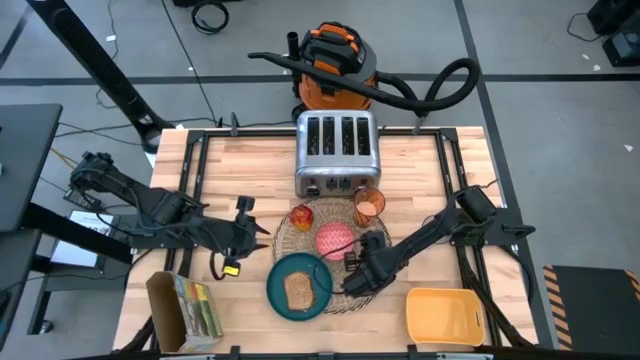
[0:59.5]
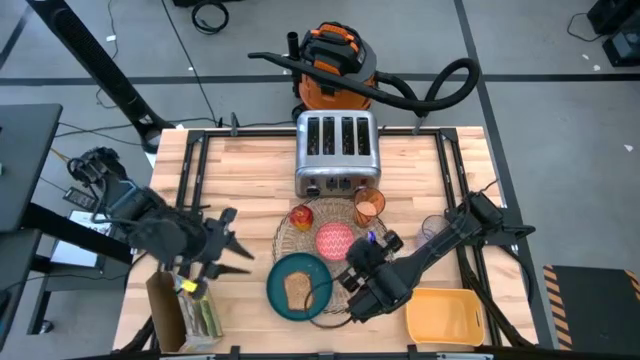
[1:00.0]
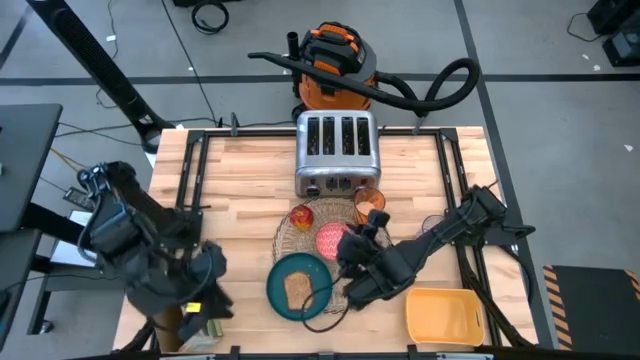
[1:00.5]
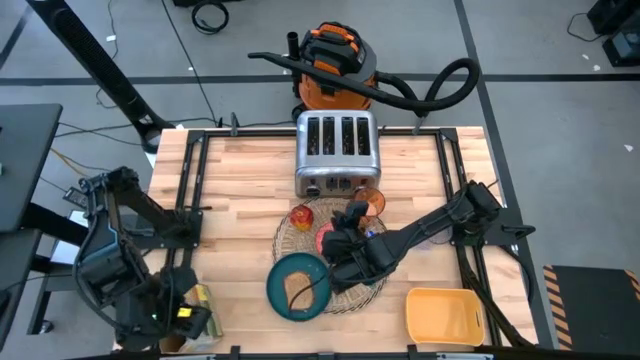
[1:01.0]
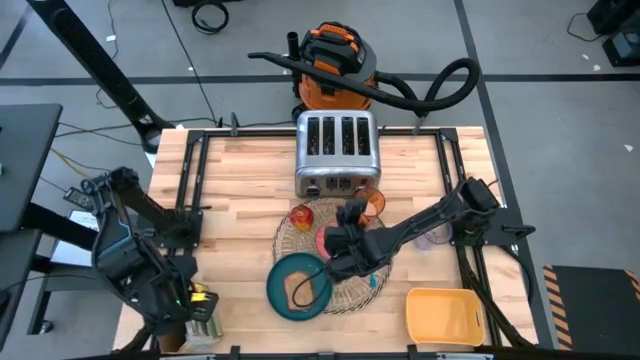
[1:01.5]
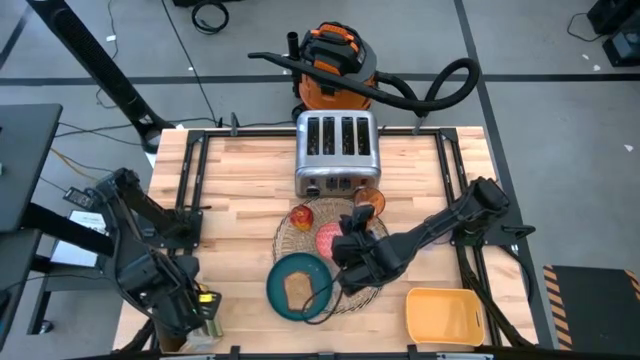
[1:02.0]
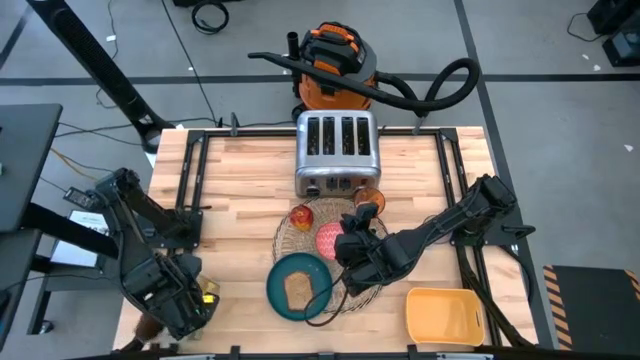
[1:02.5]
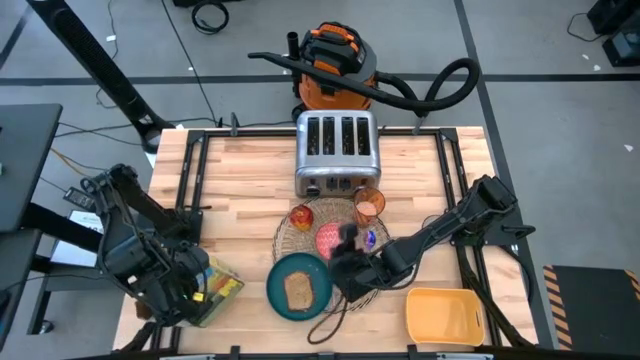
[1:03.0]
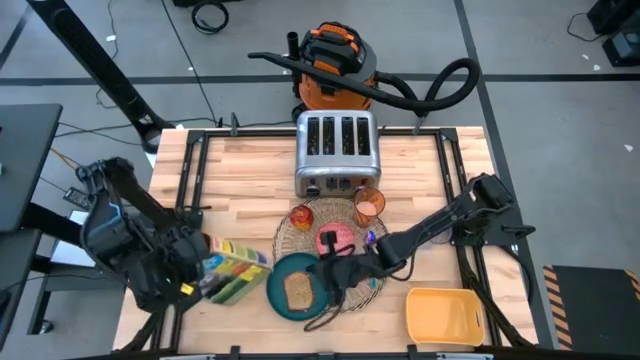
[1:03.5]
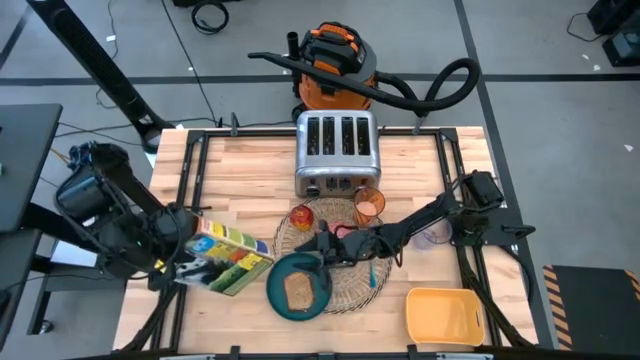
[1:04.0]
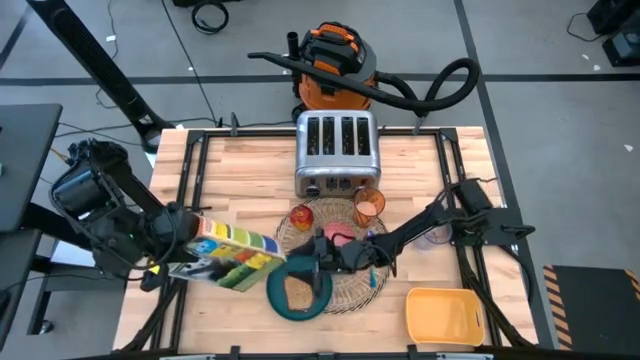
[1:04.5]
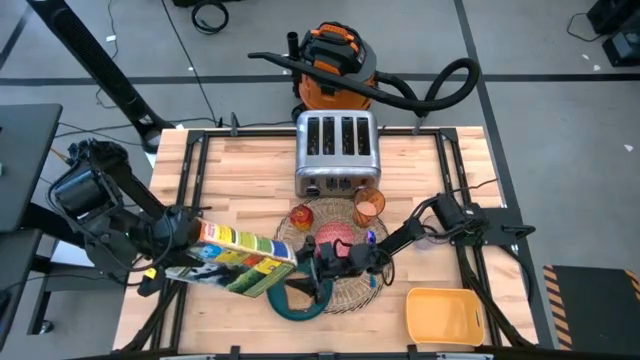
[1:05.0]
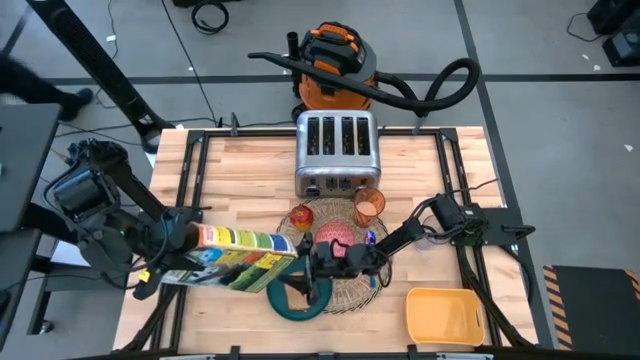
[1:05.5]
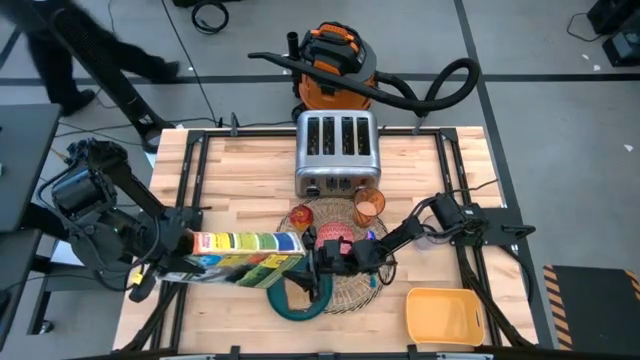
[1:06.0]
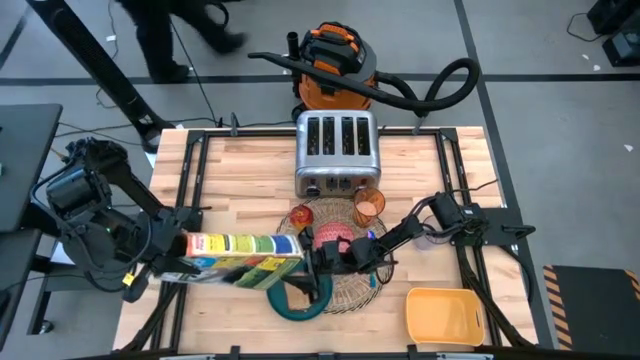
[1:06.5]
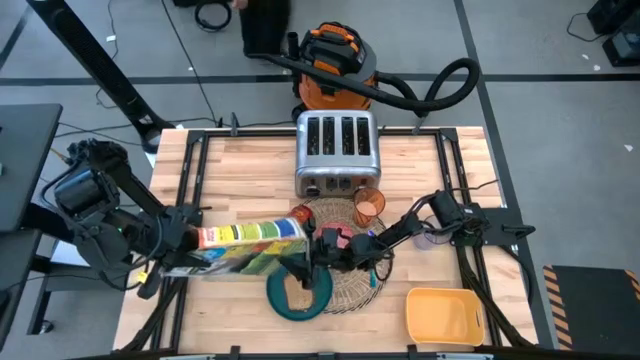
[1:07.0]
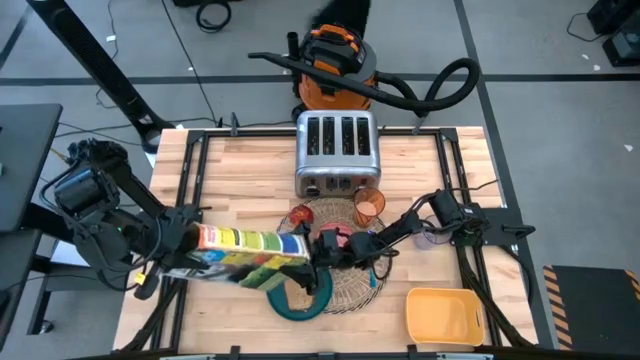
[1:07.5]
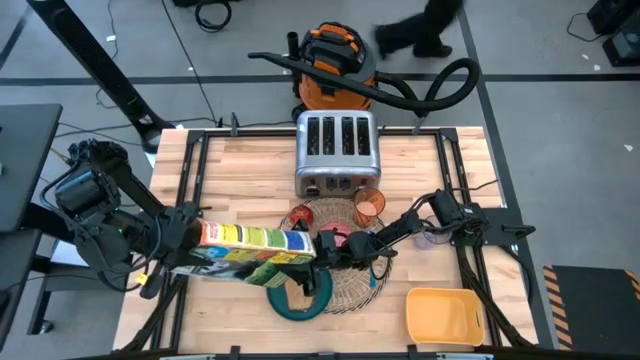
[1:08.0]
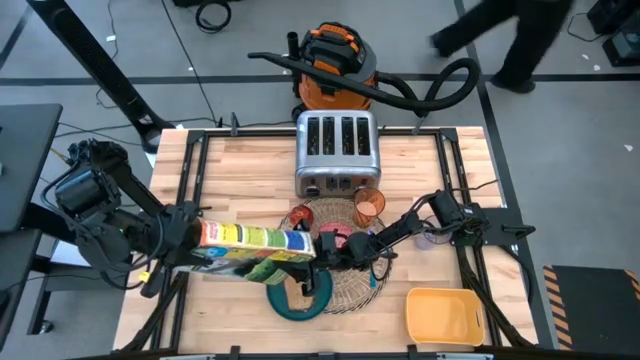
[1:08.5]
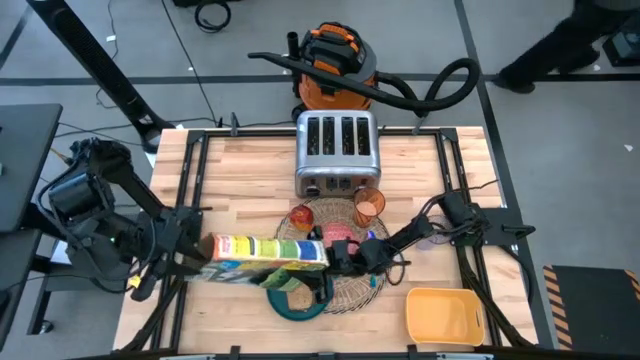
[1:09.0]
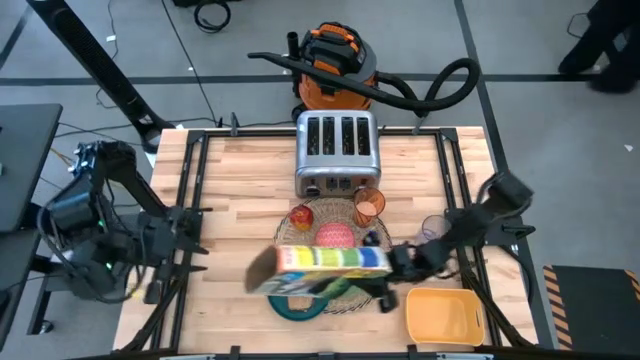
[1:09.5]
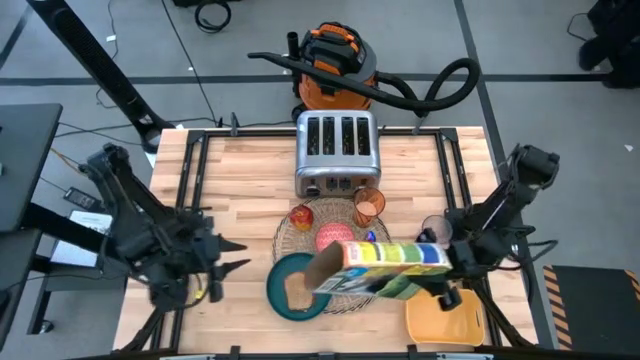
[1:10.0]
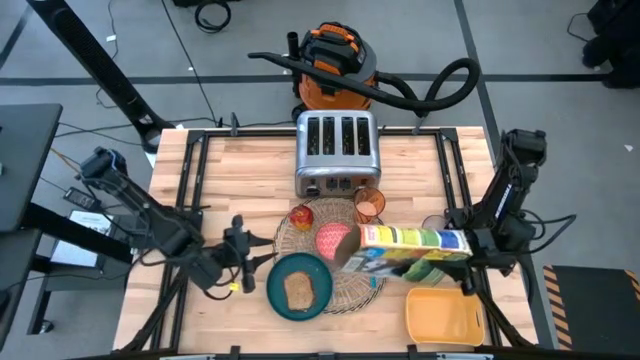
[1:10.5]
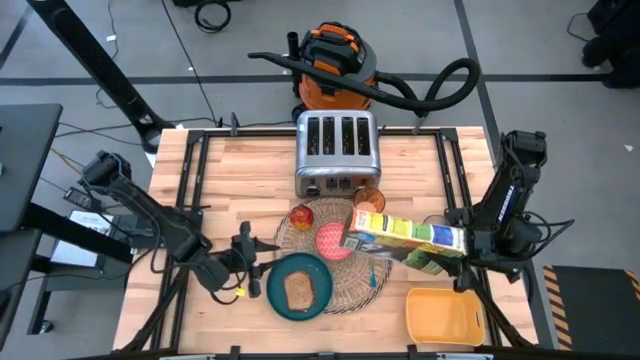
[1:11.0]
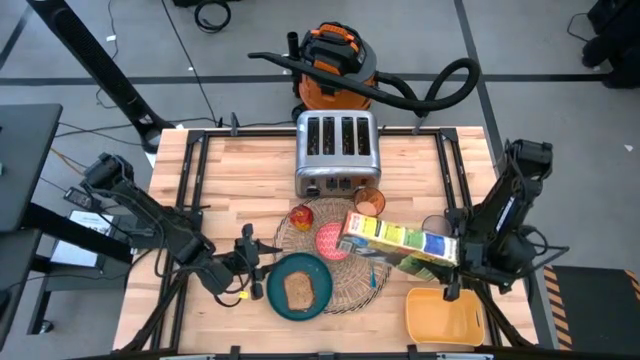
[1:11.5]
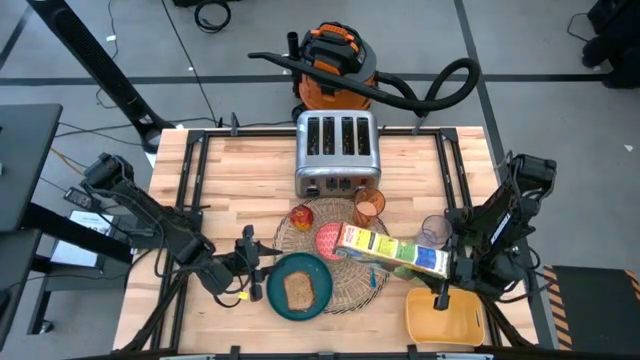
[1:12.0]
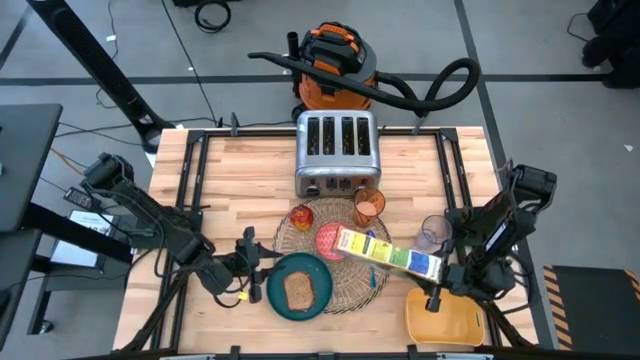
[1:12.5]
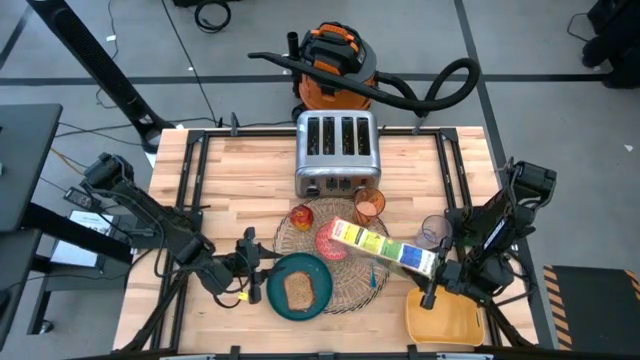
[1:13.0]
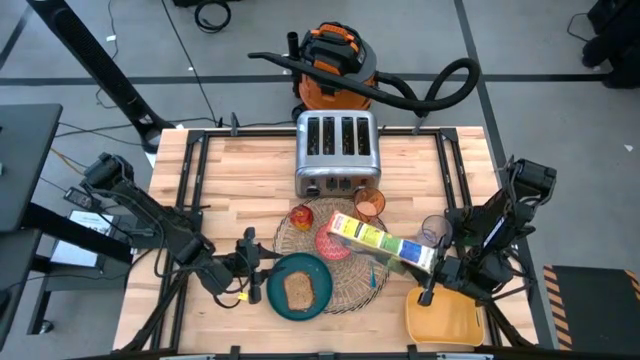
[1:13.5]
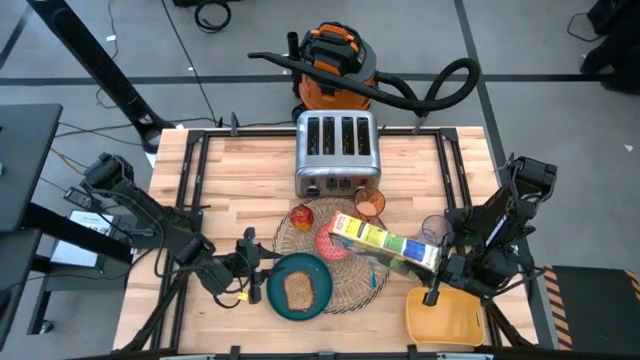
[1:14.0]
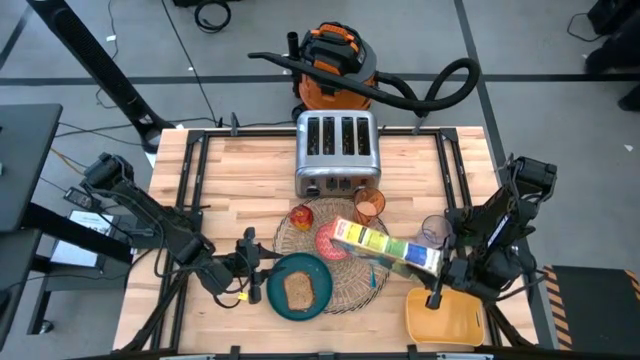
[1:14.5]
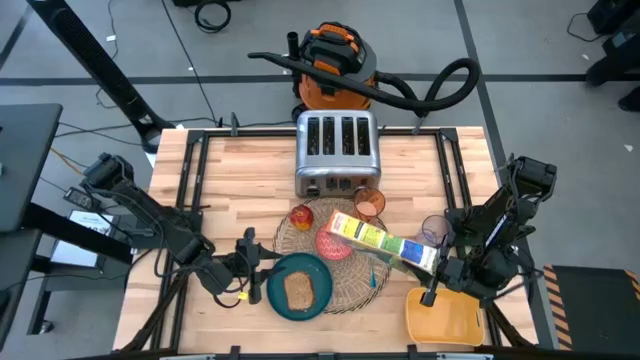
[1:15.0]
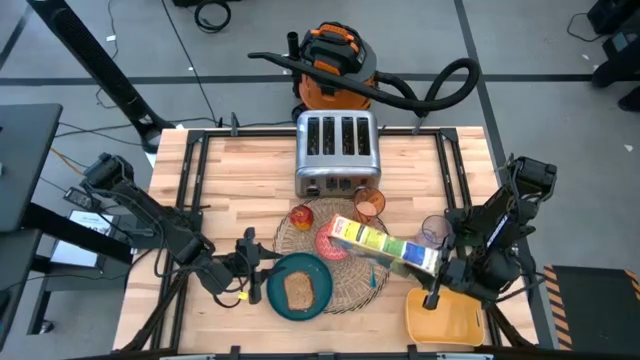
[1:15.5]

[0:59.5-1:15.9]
Task: Arrange a breakfast setting
Pour the yellow cereal from the cereal box into the red patterned bowl

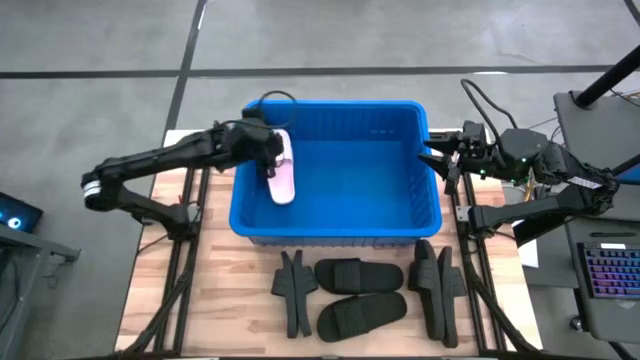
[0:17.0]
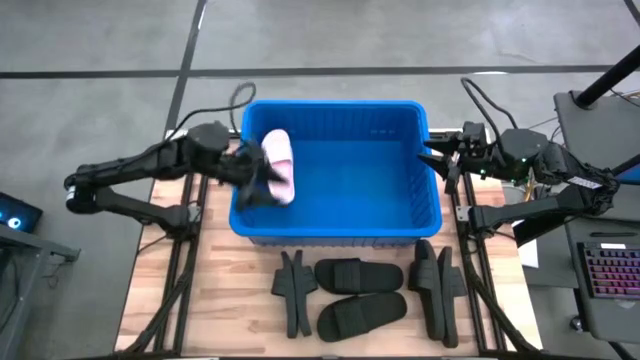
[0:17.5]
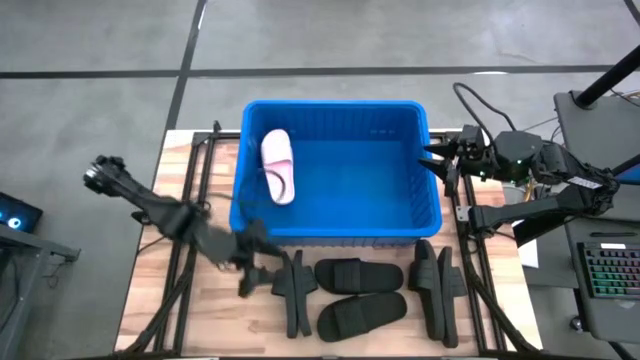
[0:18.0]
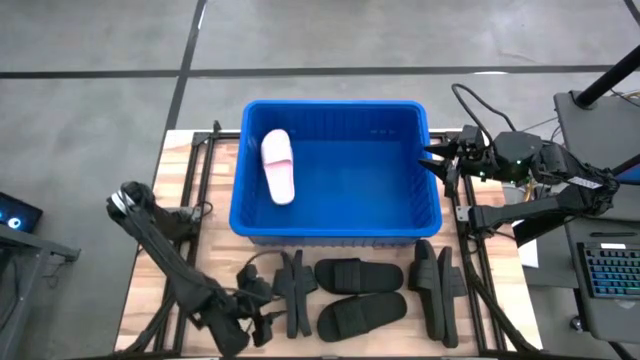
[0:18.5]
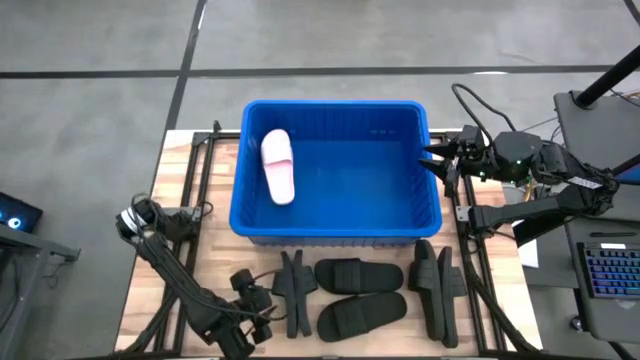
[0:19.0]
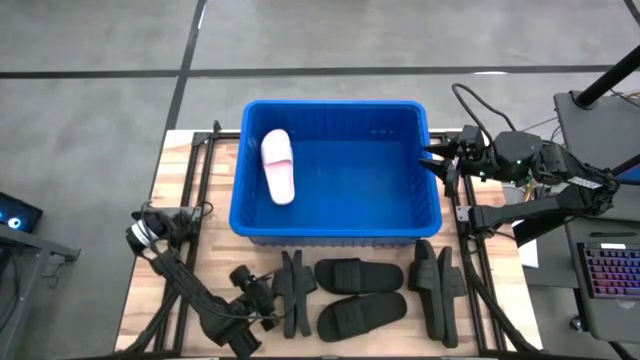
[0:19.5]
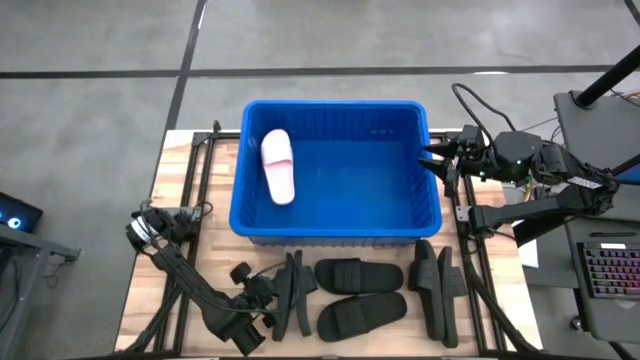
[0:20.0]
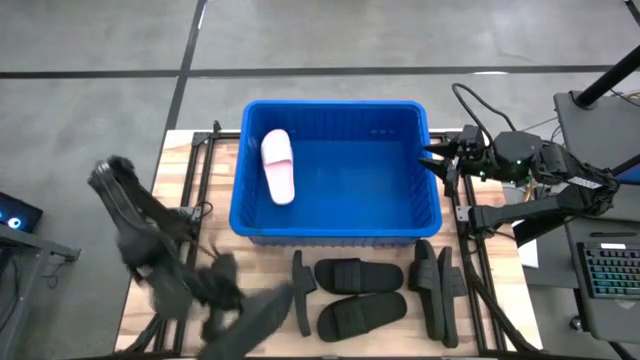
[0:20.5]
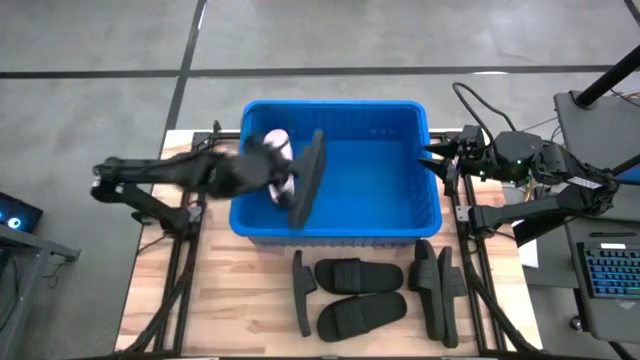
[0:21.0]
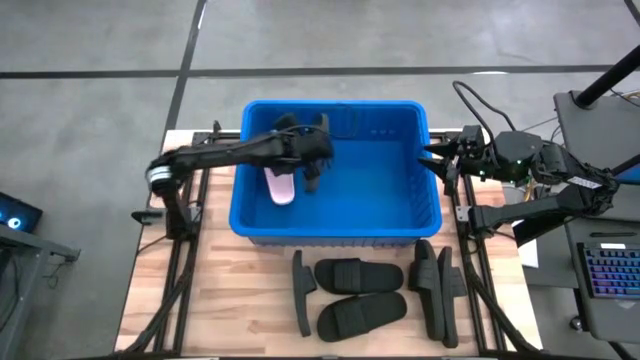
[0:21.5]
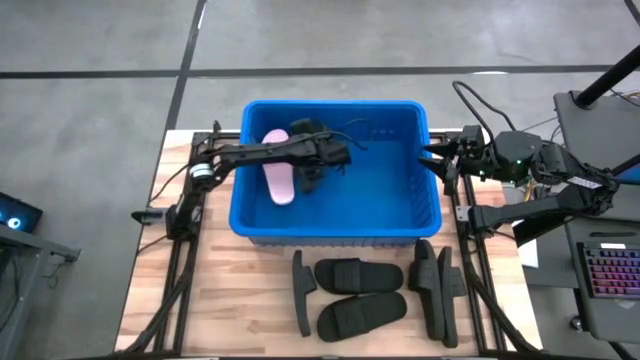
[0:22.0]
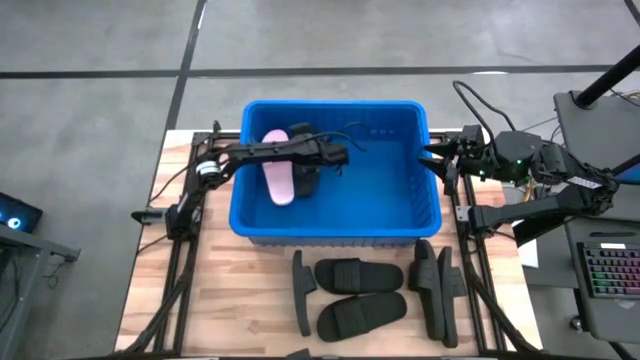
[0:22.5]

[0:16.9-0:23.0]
Task: Pick and place slides into bin
Put the black slide into the bin
